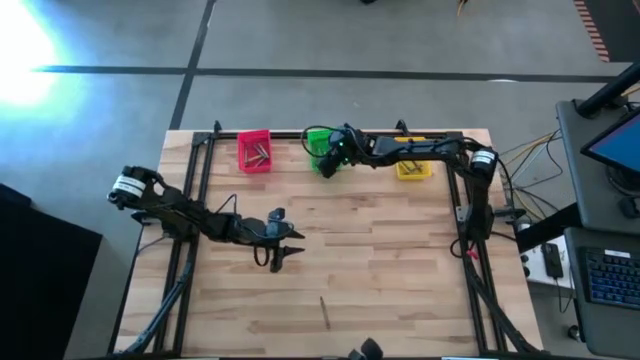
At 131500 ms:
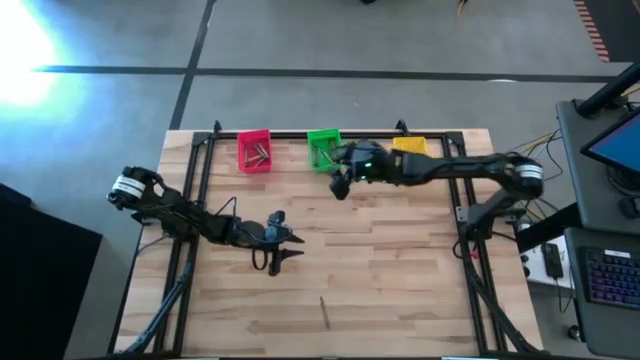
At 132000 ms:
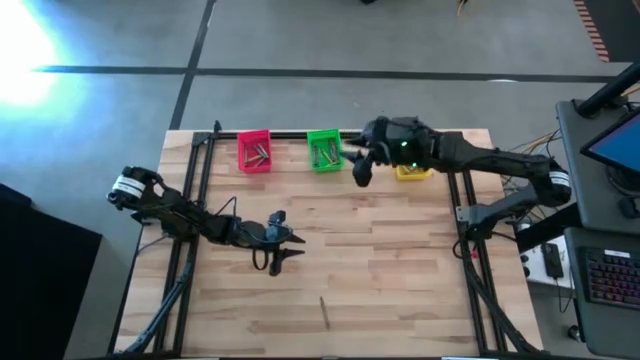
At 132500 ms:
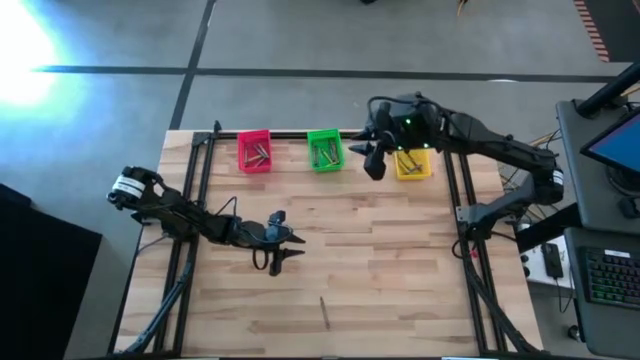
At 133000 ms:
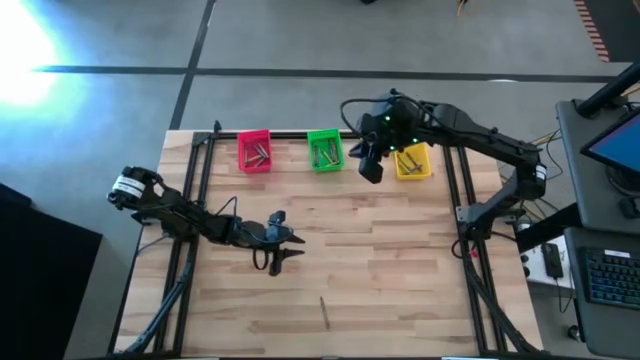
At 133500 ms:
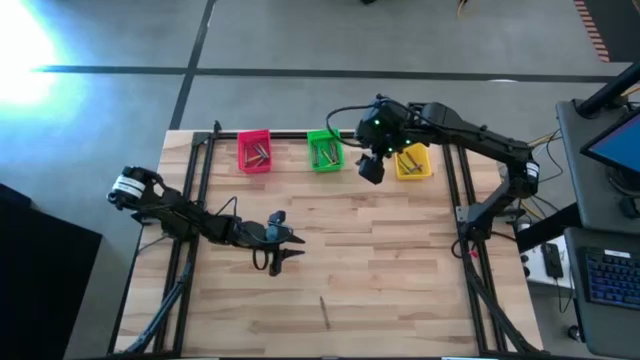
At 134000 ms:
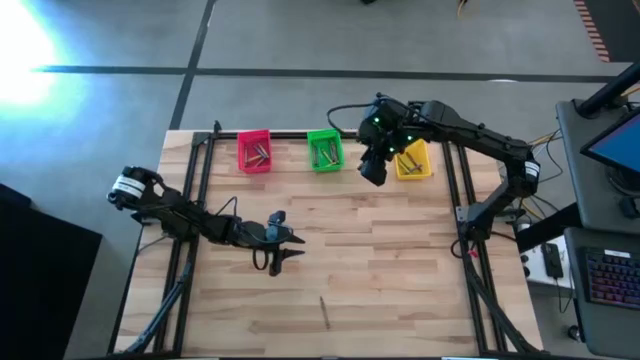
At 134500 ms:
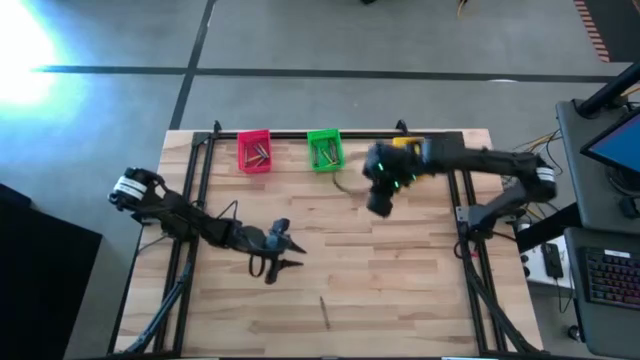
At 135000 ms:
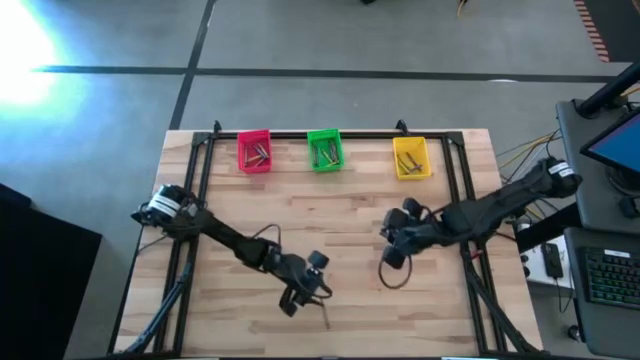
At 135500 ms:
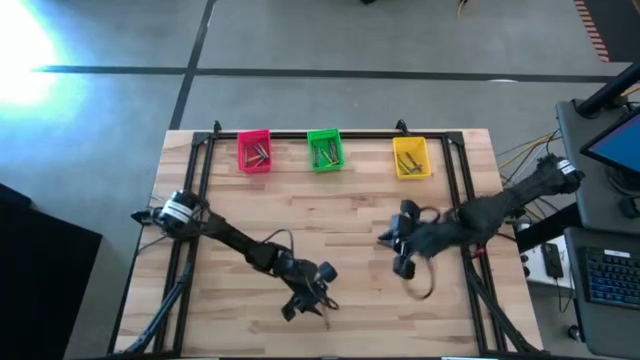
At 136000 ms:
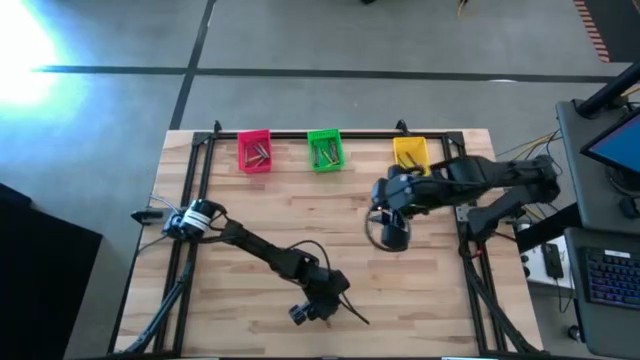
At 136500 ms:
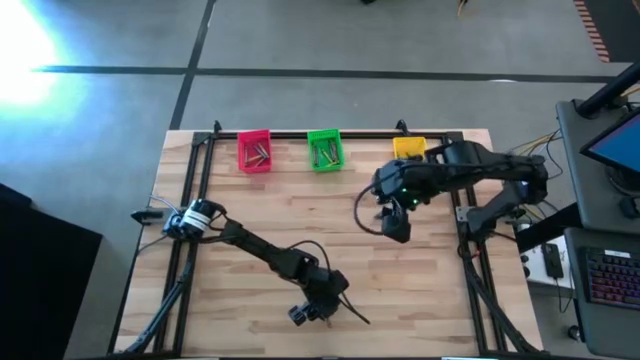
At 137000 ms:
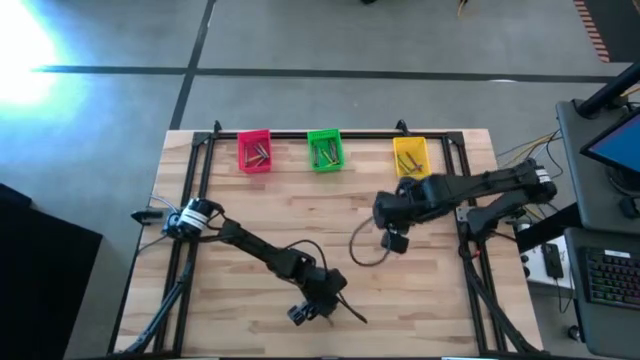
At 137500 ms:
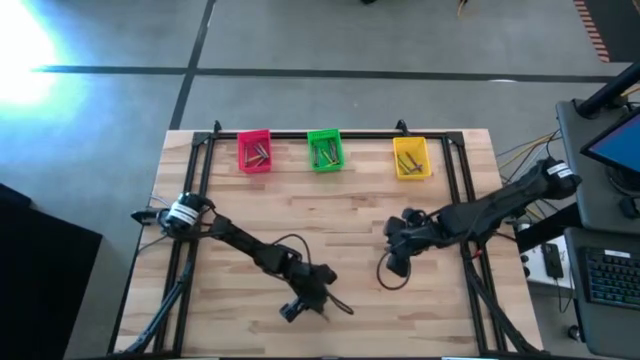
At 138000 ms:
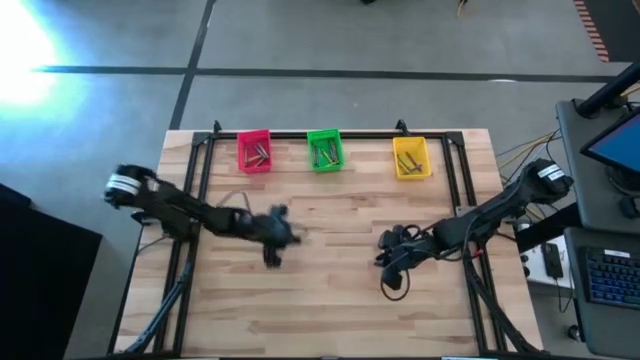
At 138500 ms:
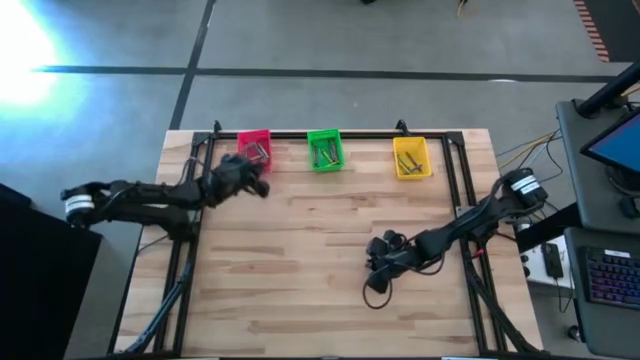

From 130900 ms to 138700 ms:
Task: Sort crayons
Put the brown crayon into the red basket

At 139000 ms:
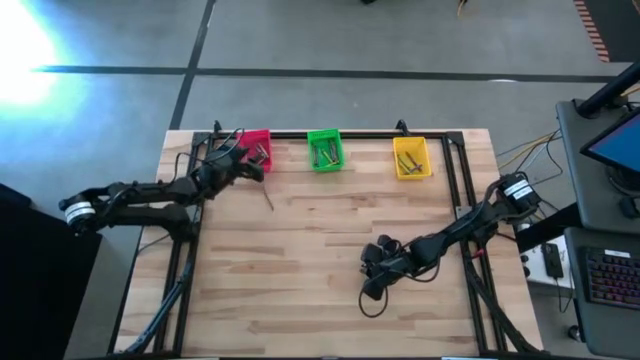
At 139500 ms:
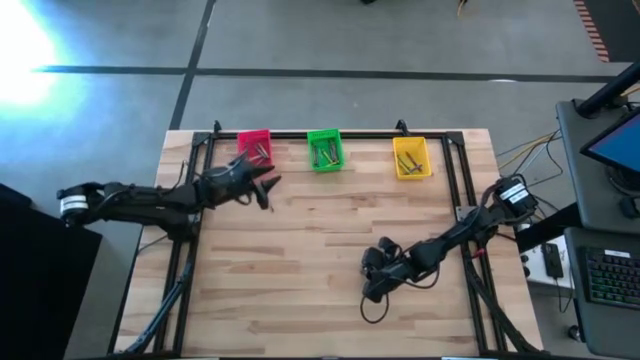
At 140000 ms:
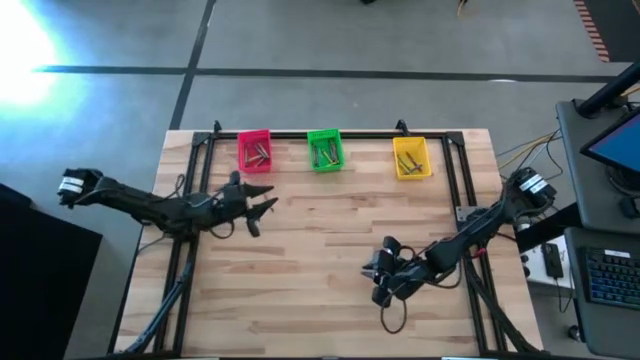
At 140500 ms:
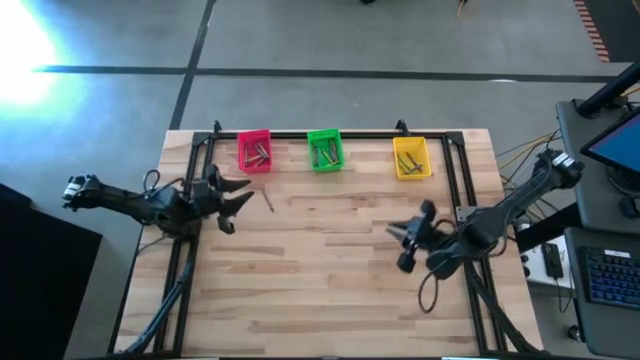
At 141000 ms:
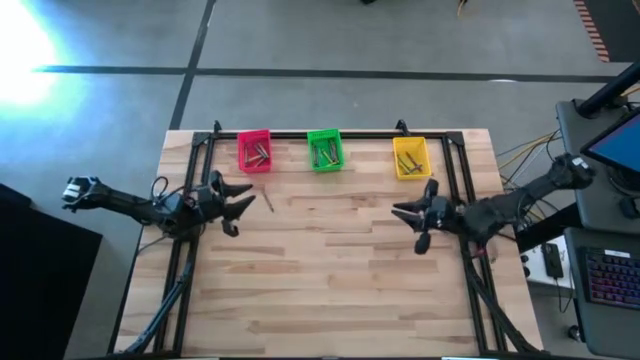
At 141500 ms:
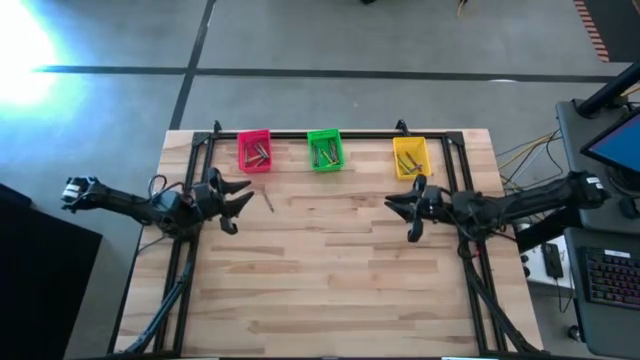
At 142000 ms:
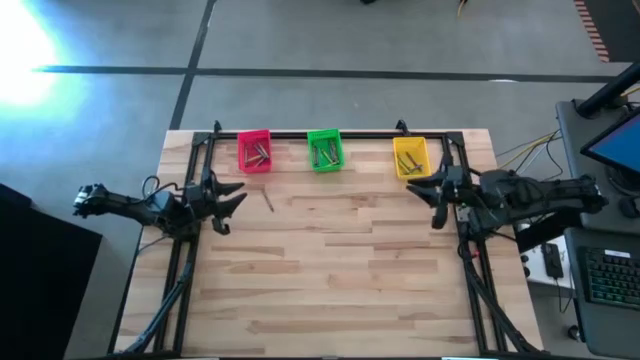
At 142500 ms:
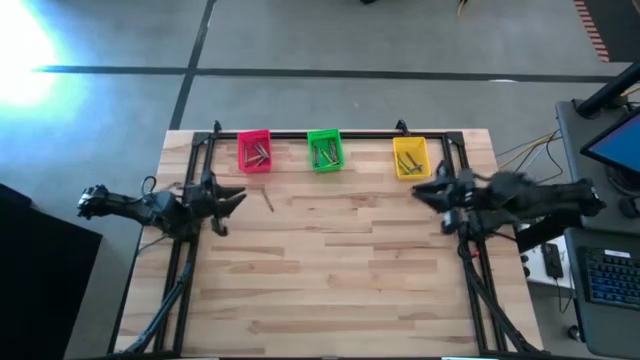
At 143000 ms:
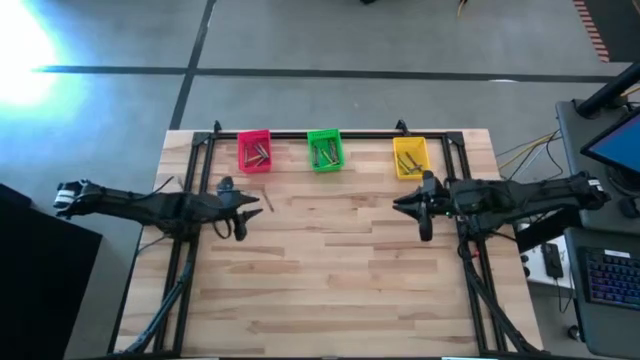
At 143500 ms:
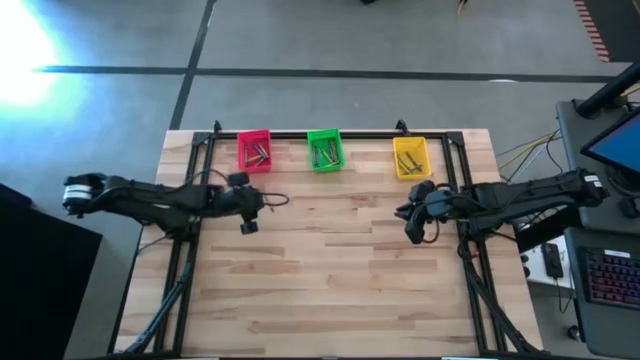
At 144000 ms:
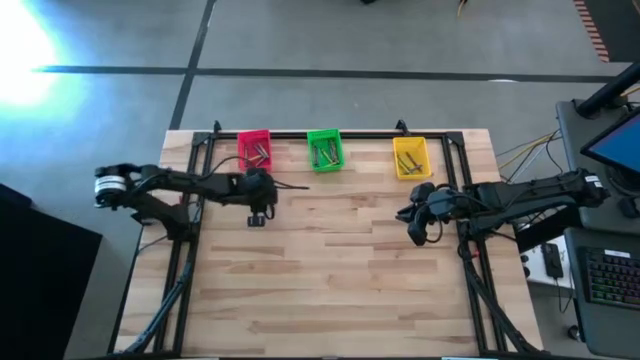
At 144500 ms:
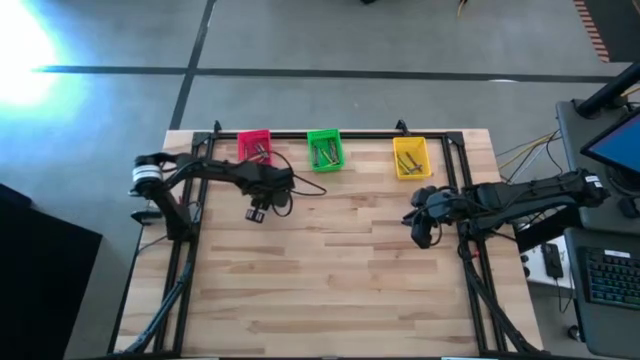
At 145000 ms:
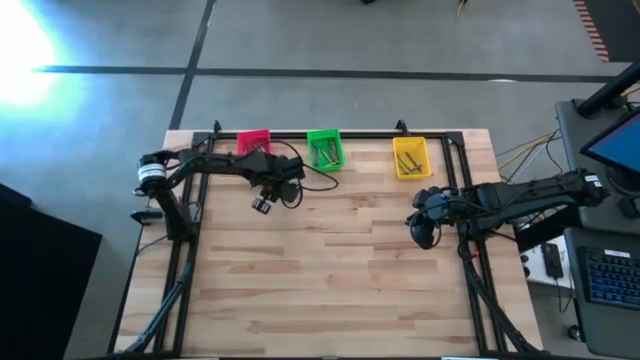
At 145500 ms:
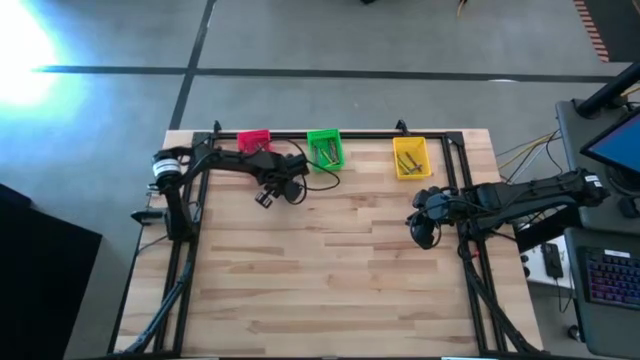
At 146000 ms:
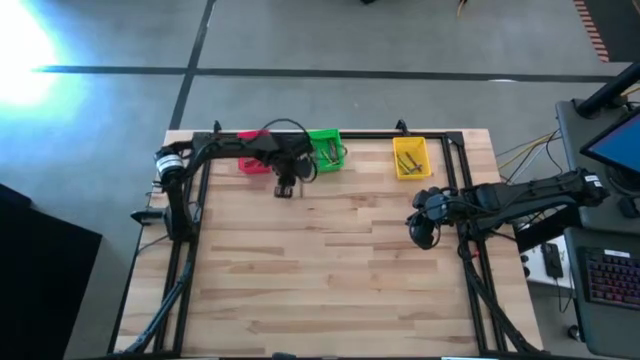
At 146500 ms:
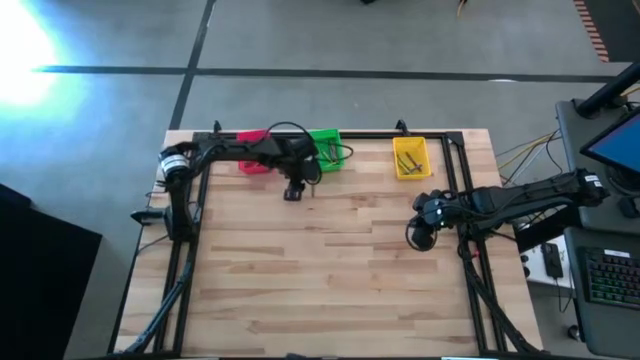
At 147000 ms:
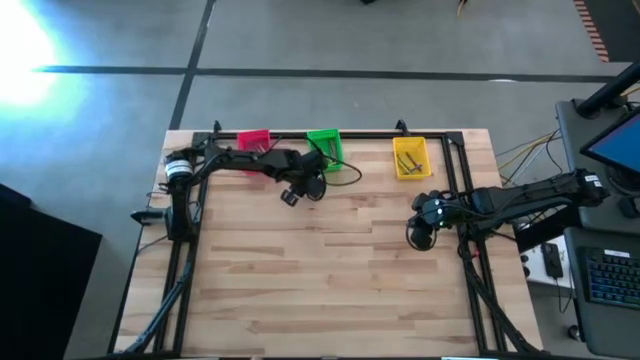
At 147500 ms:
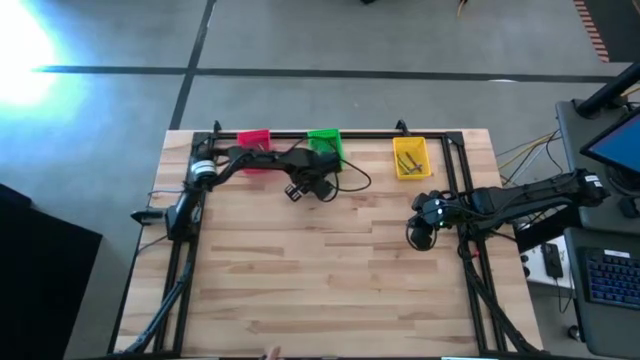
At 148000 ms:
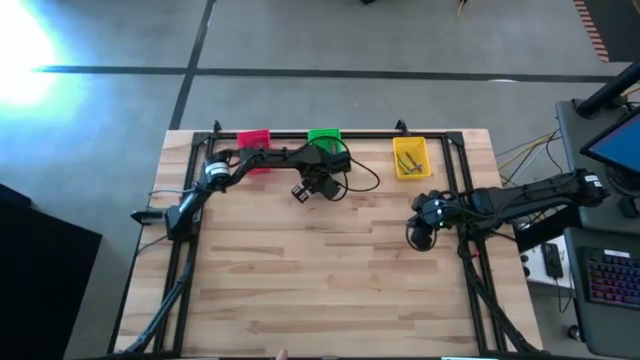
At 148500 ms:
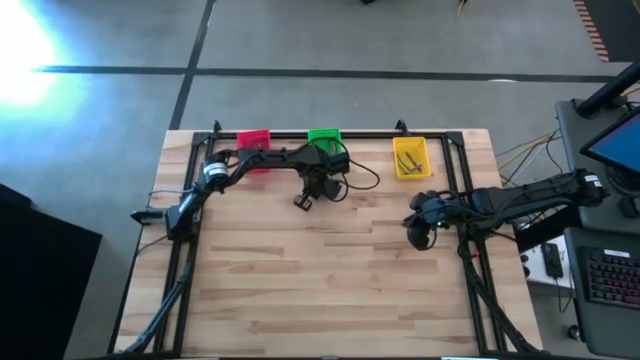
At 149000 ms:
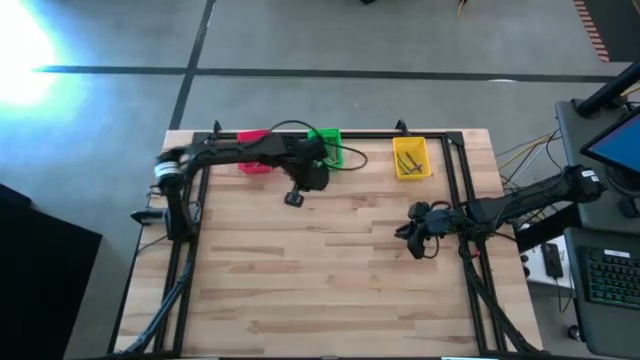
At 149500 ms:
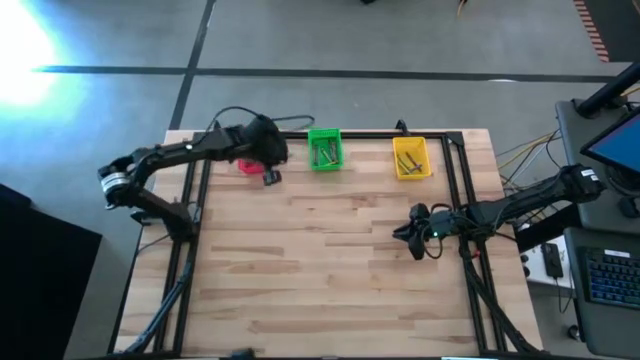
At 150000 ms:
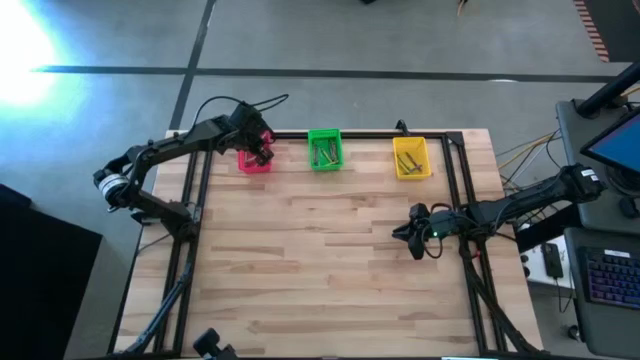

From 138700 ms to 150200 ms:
Put the brown crayon into the red basket

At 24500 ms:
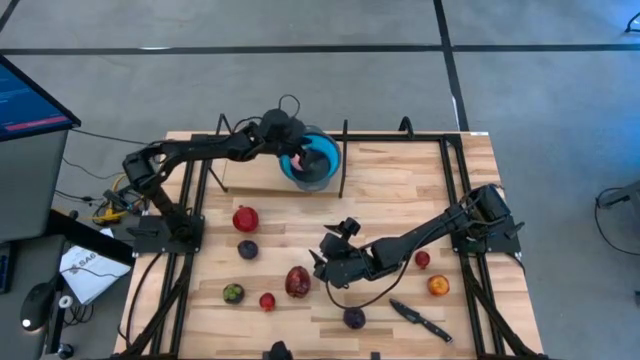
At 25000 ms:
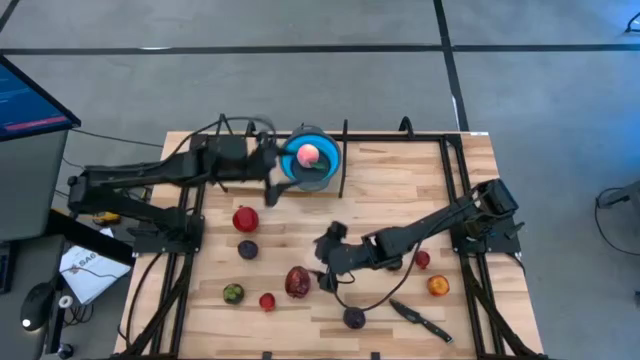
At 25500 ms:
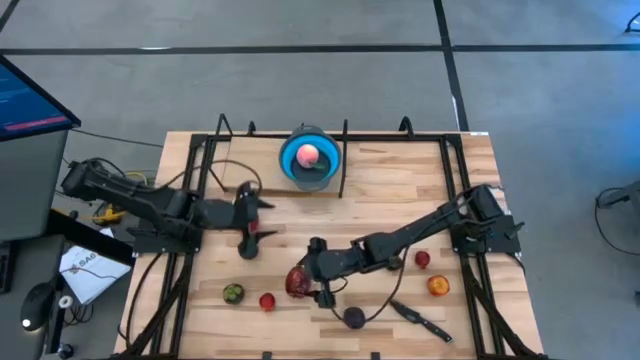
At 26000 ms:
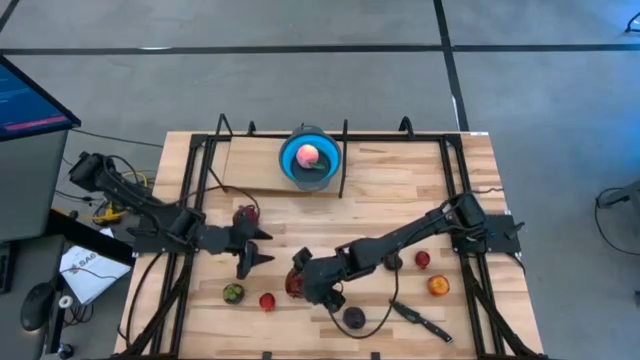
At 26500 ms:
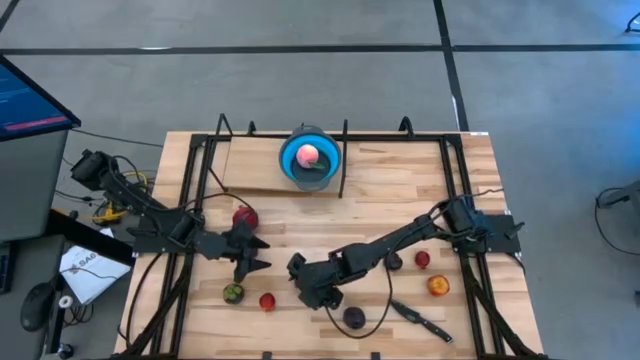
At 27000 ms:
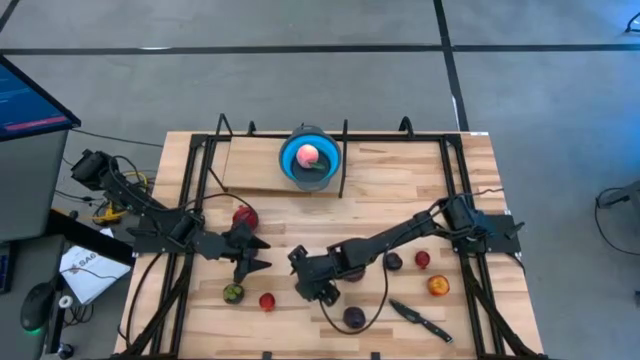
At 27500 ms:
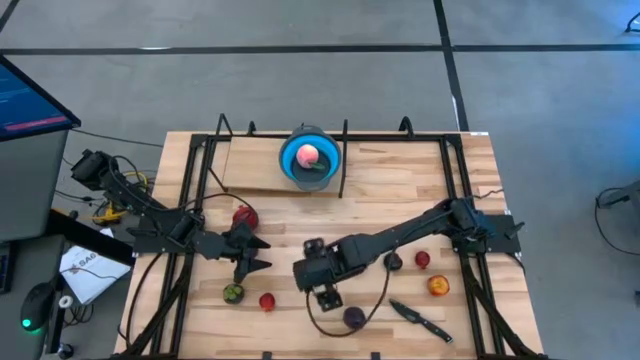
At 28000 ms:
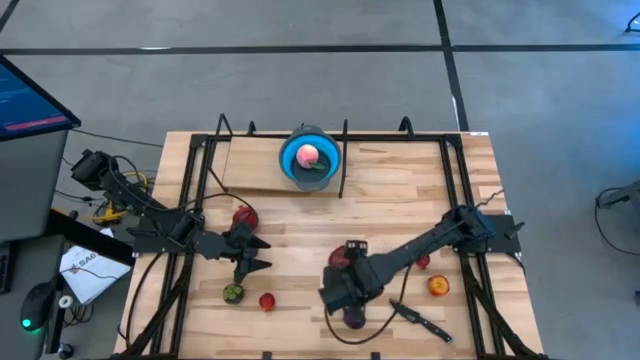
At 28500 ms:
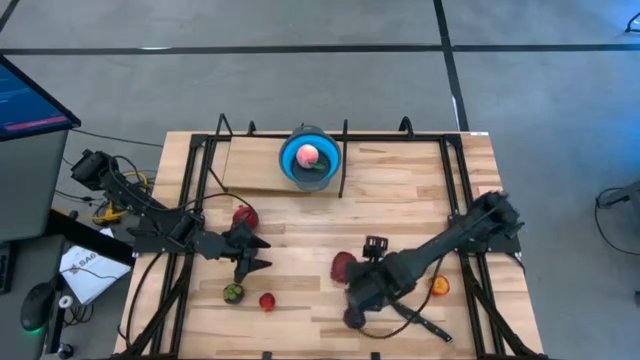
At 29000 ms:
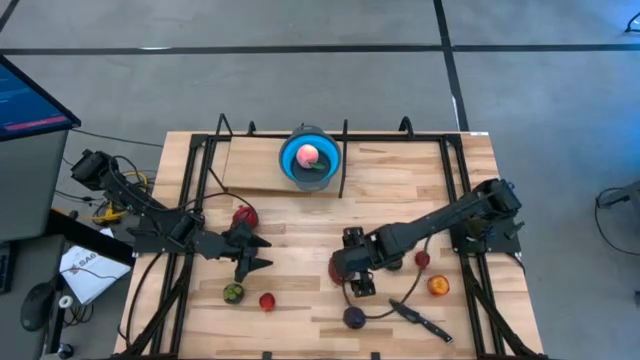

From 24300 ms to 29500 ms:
Task: Pick & Place Fruit
Put the red apple into the blue strainer bowl on the shelf
